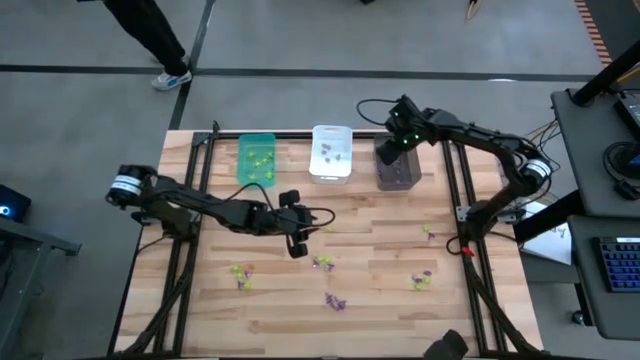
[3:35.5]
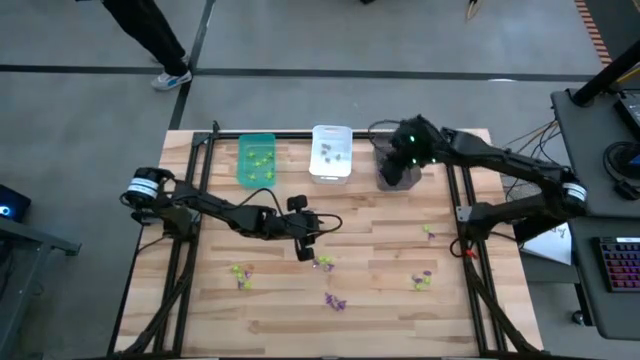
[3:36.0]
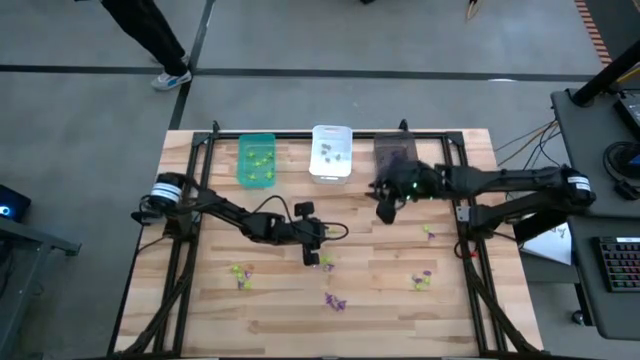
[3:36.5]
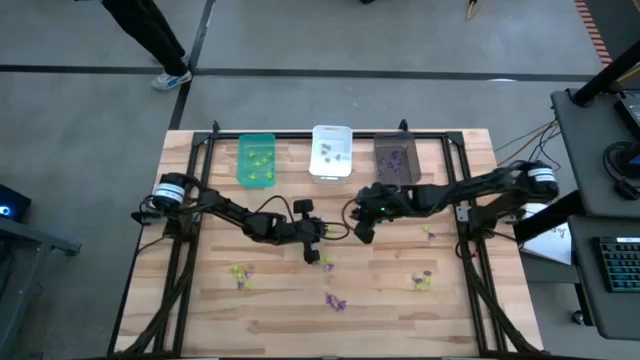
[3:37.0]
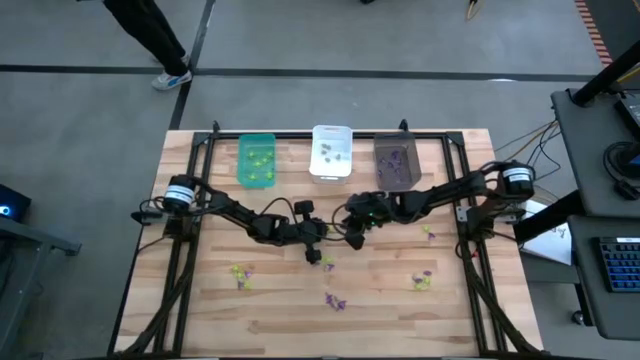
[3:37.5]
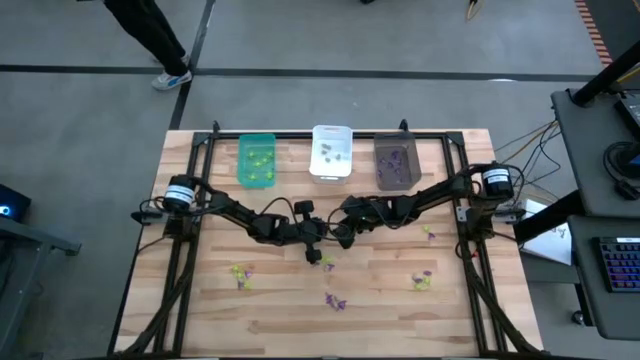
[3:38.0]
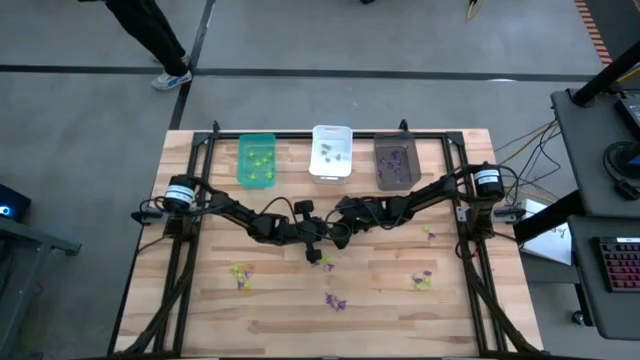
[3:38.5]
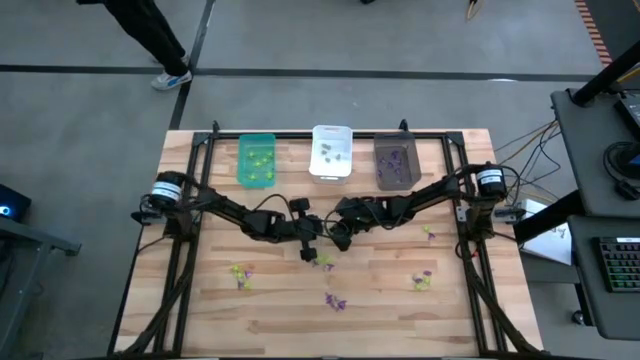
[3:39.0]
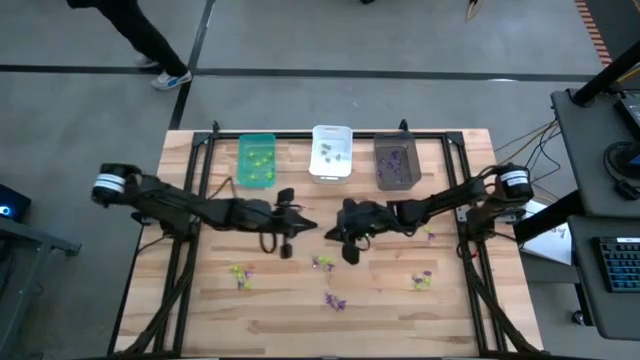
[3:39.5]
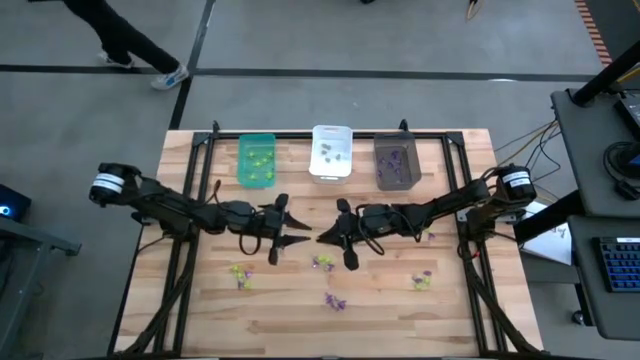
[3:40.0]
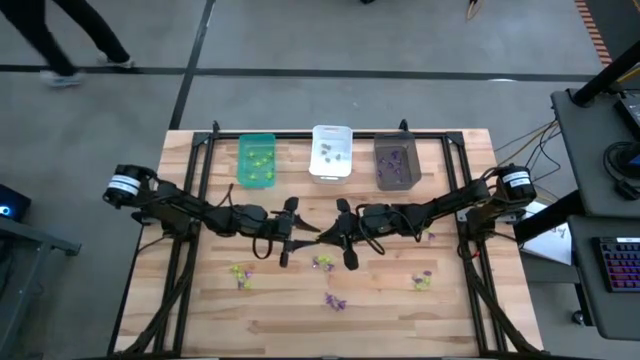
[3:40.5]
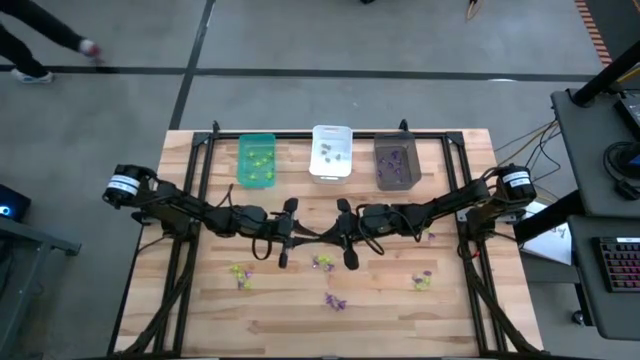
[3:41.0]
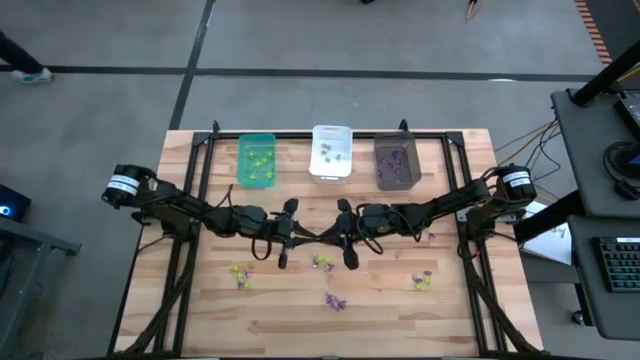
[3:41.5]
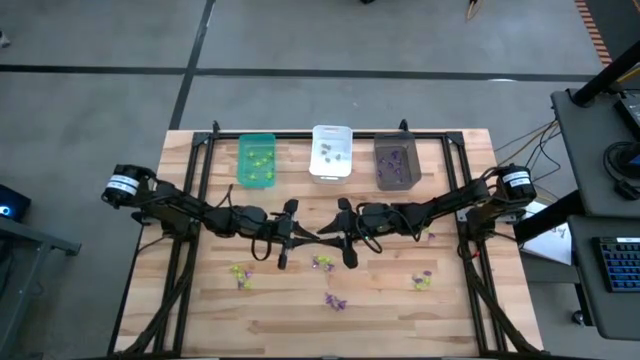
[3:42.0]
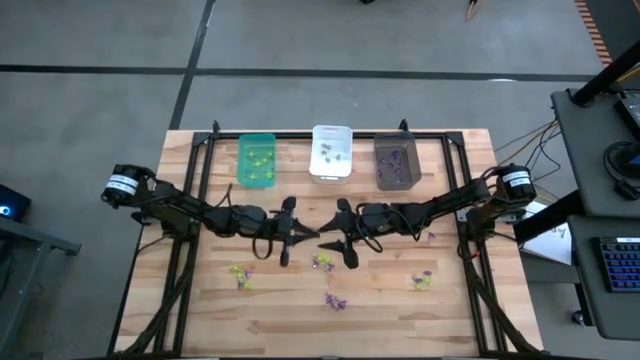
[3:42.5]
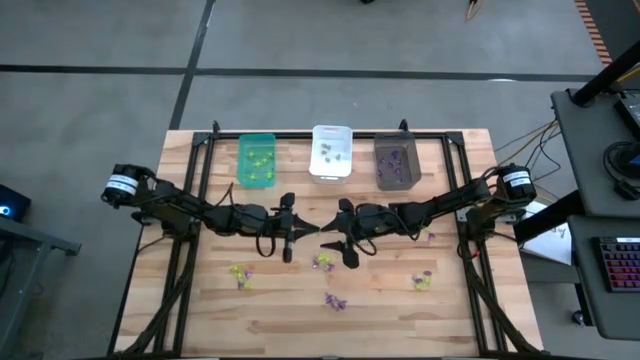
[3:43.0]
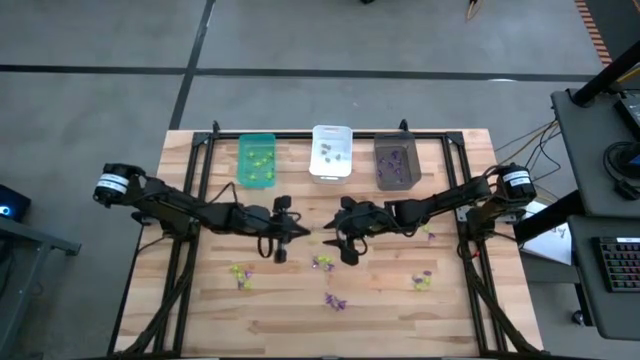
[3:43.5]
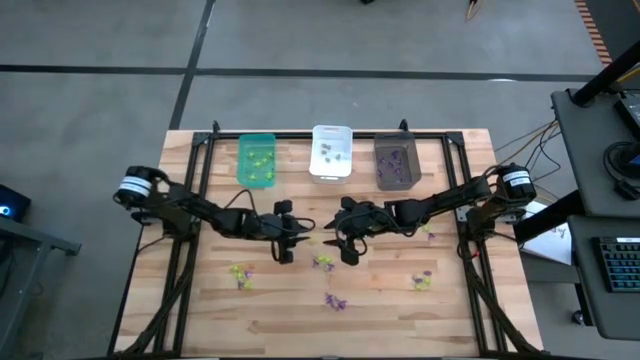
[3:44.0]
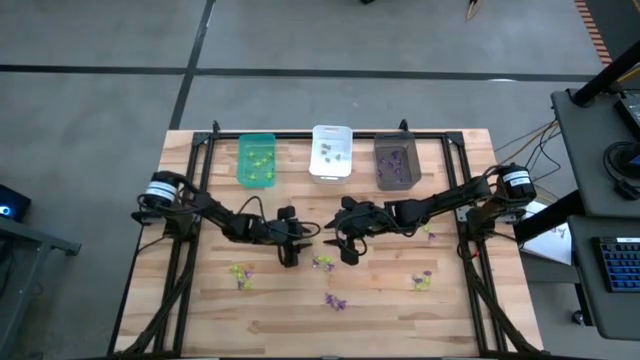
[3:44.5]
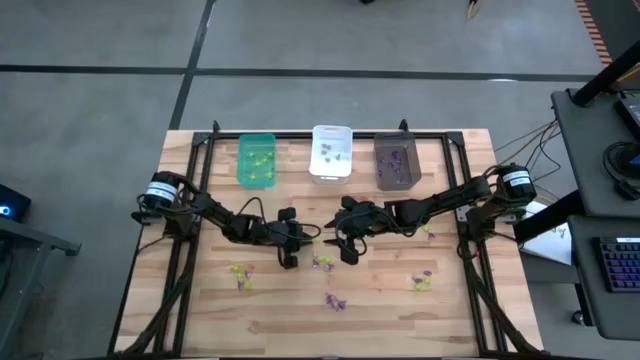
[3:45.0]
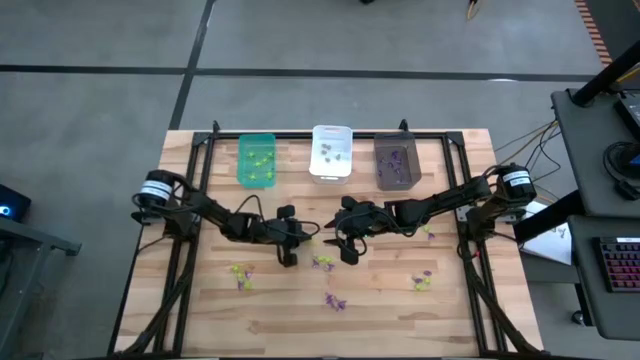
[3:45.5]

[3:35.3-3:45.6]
Task: Sort Halloween decoration
Put the green spider toy into the blue bin

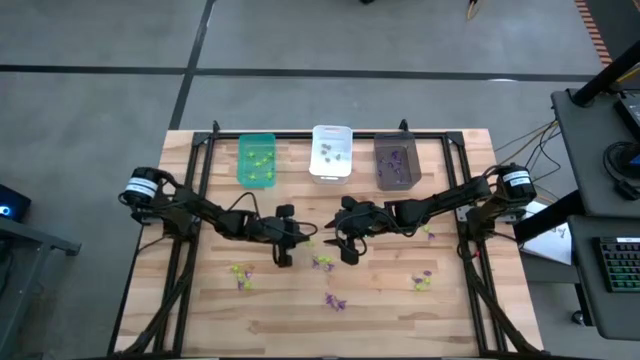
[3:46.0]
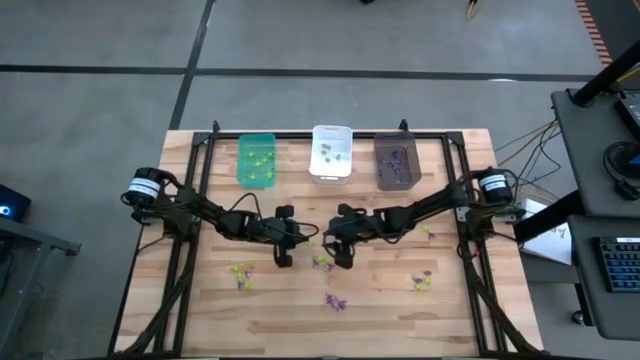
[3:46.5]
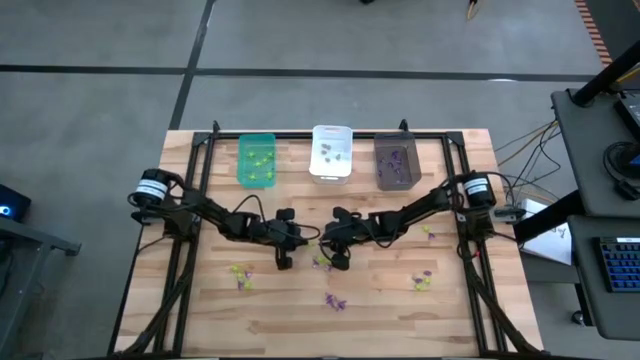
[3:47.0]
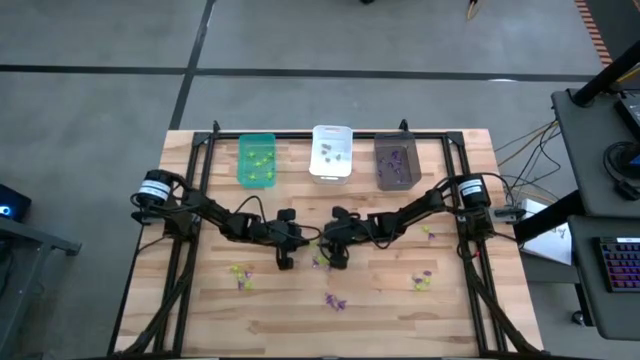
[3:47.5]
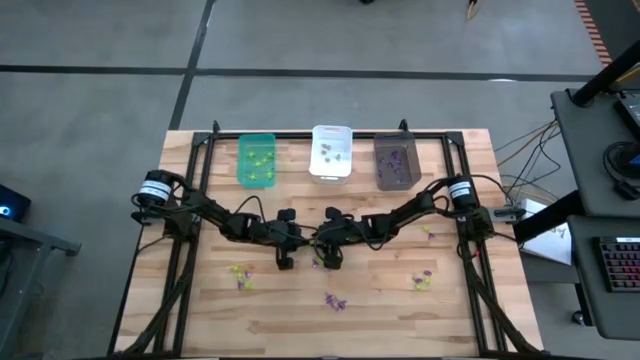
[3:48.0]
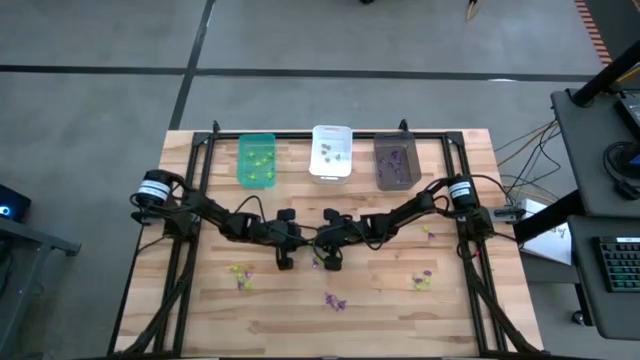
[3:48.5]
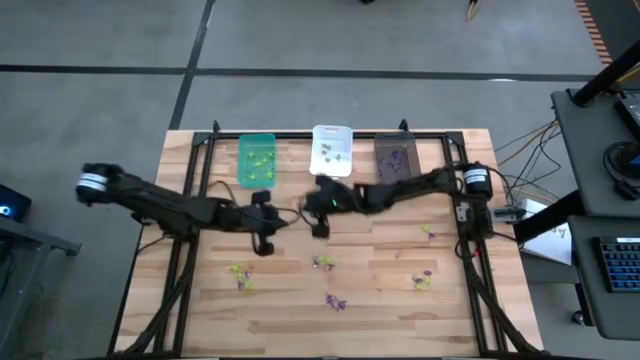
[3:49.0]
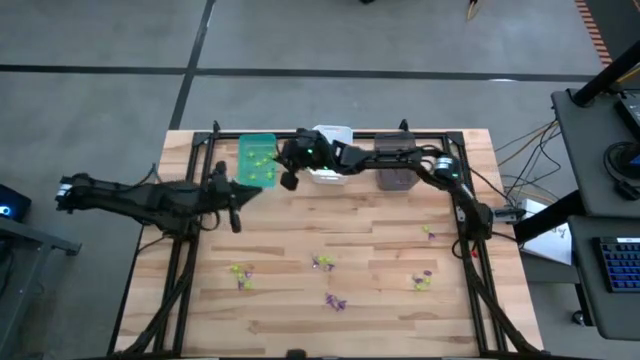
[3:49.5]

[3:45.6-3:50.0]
Put the green spider toy into the blue bin

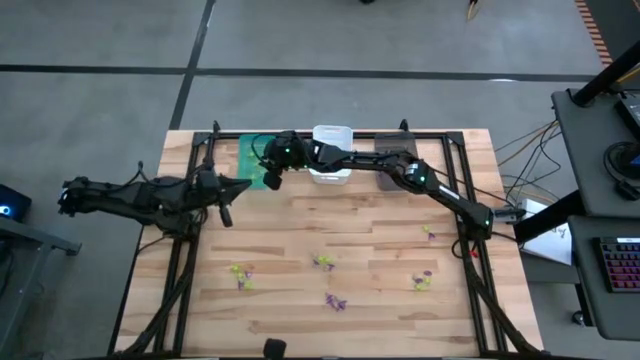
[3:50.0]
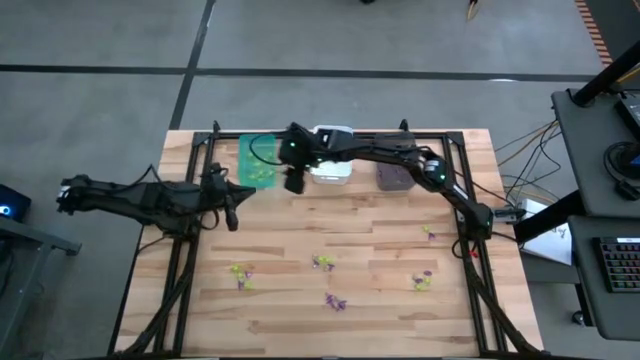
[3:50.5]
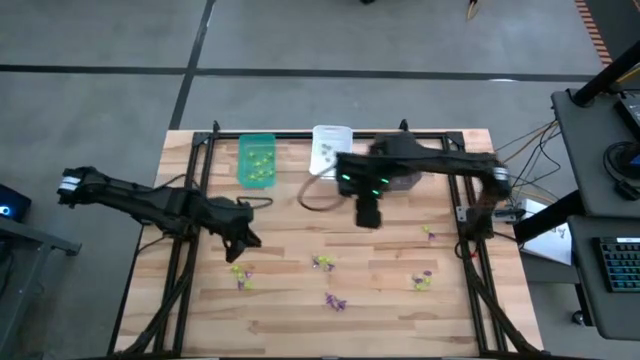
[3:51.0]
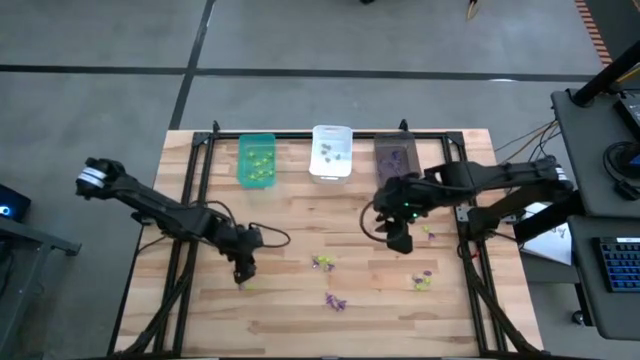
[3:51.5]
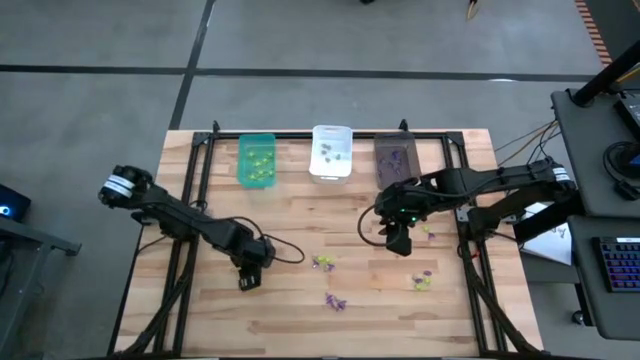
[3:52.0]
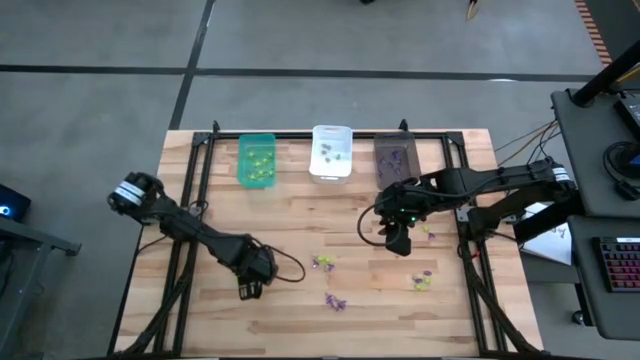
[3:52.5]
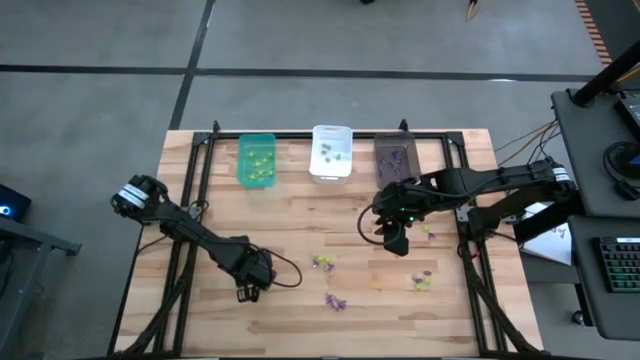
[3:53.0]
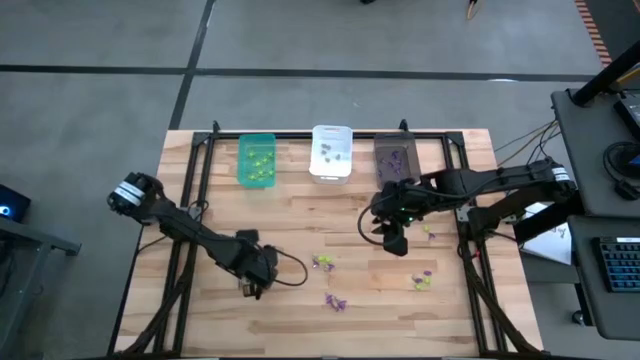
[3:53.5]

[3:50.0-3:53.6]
Put the purple witch hat toy into the gray bin
